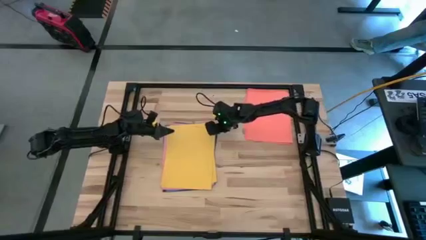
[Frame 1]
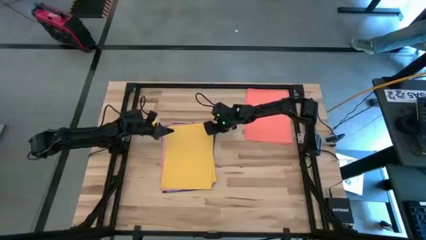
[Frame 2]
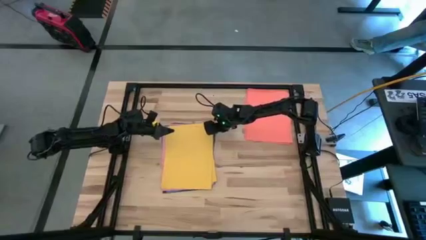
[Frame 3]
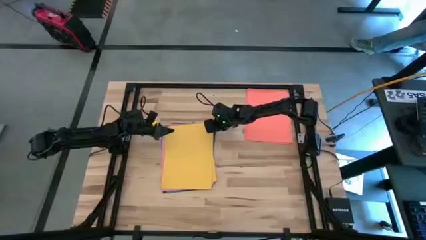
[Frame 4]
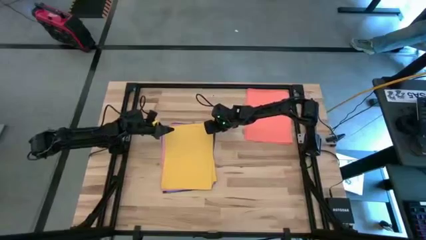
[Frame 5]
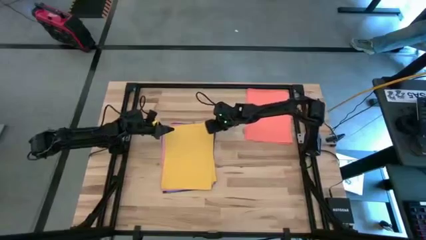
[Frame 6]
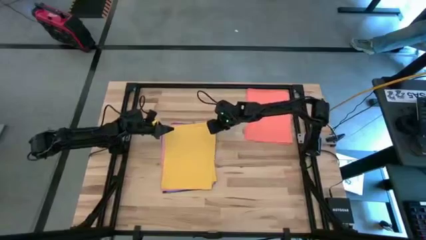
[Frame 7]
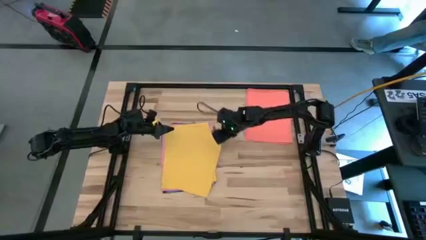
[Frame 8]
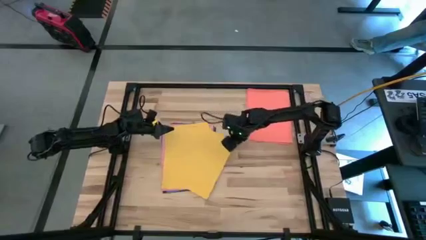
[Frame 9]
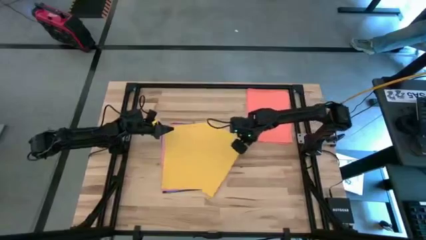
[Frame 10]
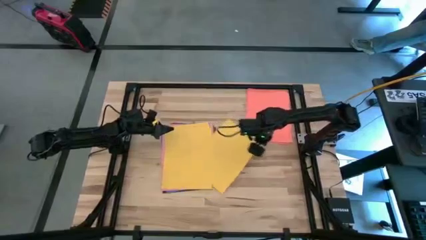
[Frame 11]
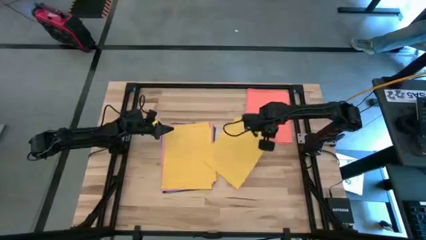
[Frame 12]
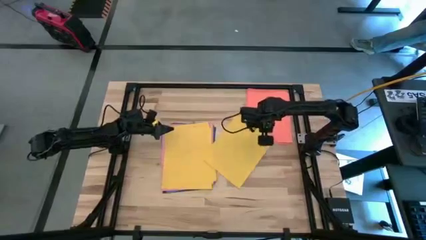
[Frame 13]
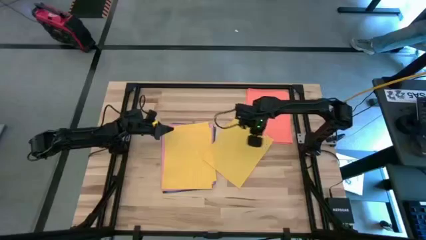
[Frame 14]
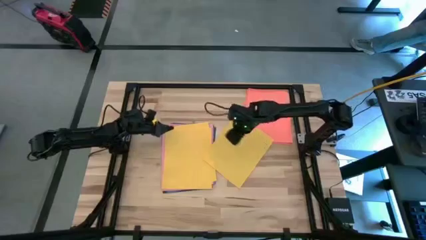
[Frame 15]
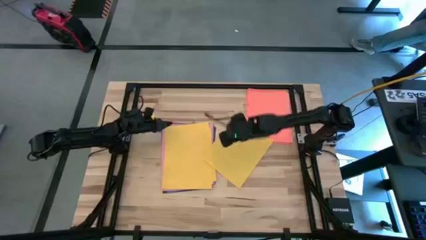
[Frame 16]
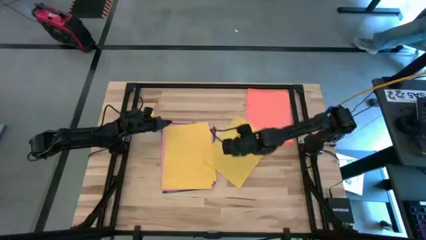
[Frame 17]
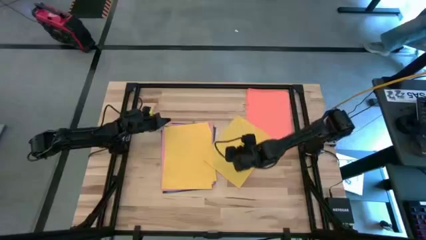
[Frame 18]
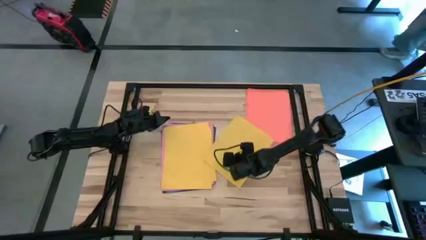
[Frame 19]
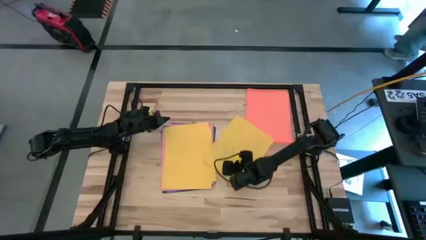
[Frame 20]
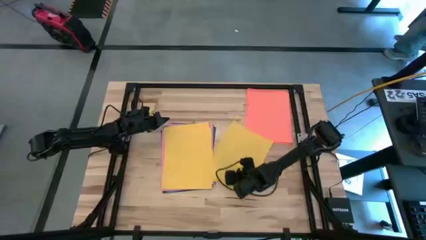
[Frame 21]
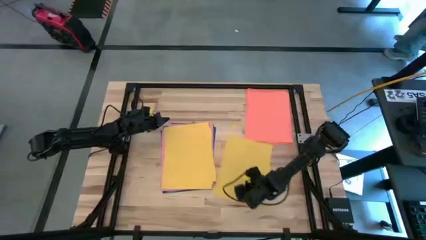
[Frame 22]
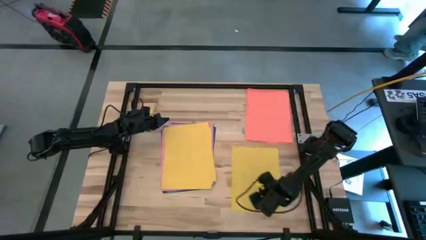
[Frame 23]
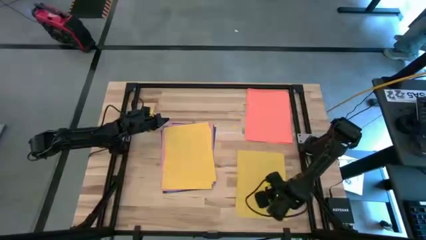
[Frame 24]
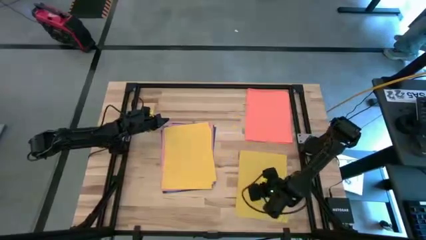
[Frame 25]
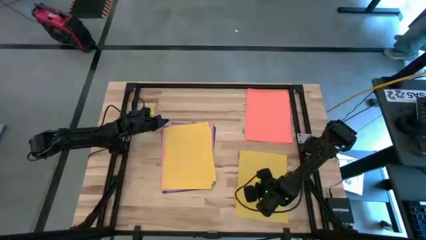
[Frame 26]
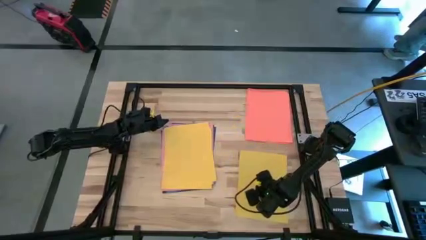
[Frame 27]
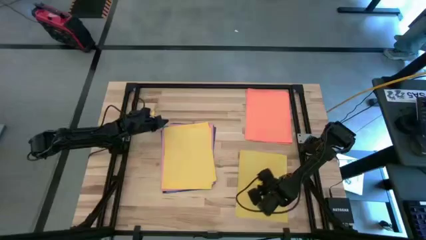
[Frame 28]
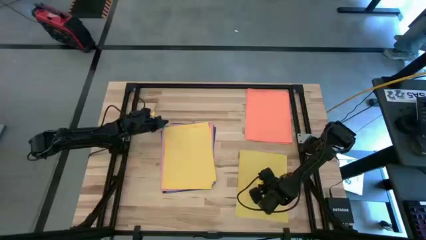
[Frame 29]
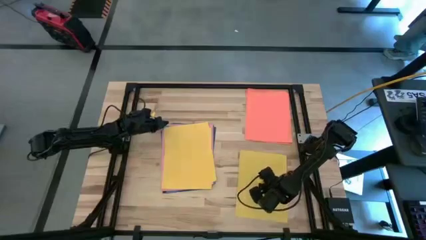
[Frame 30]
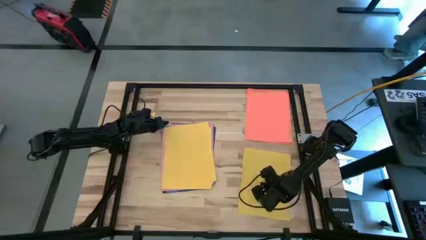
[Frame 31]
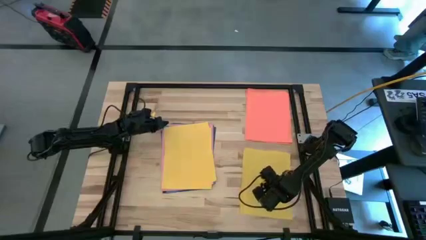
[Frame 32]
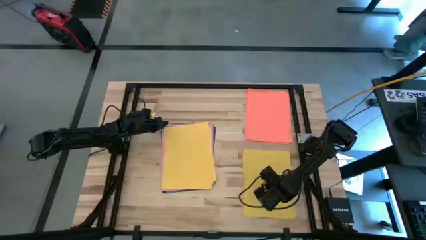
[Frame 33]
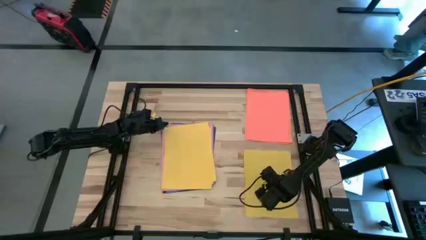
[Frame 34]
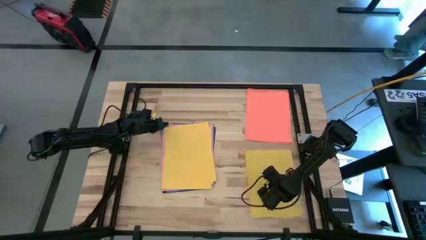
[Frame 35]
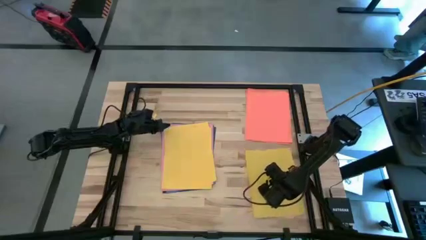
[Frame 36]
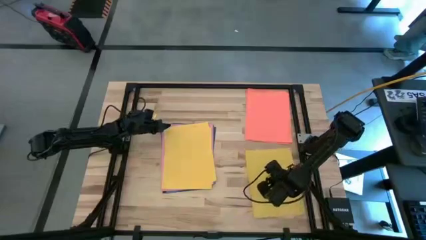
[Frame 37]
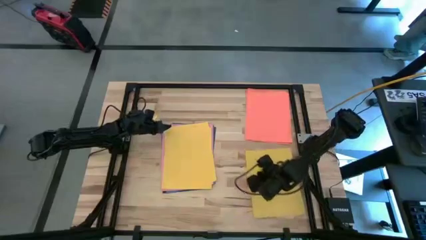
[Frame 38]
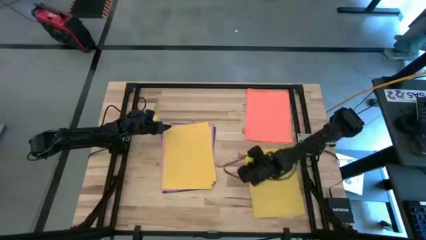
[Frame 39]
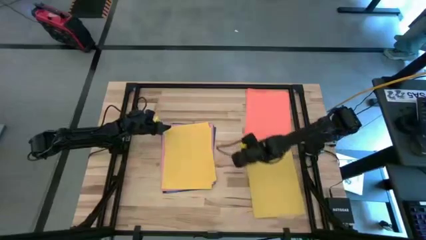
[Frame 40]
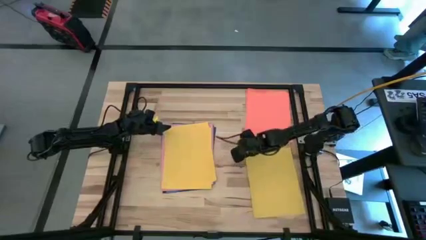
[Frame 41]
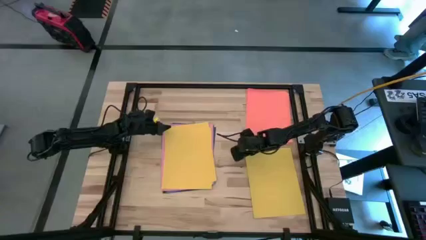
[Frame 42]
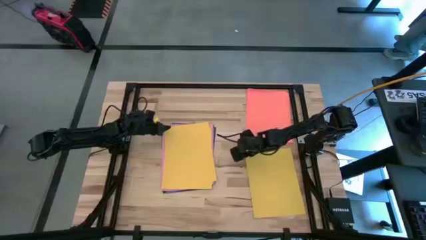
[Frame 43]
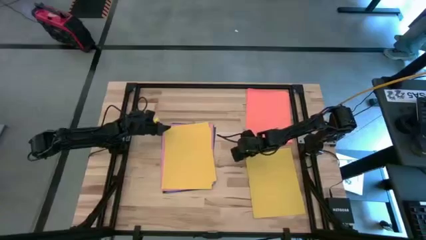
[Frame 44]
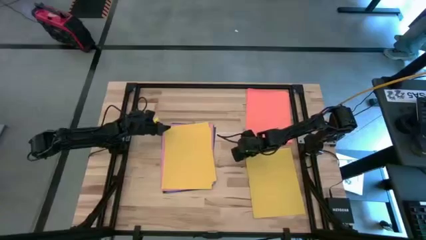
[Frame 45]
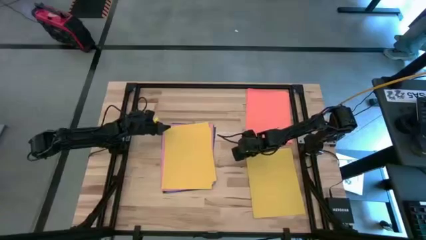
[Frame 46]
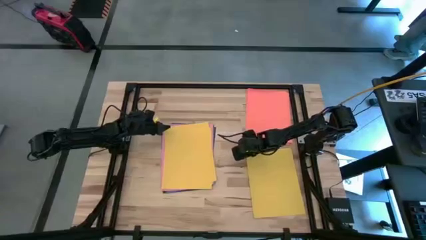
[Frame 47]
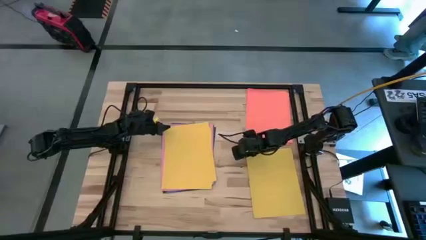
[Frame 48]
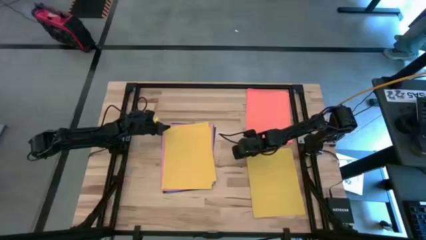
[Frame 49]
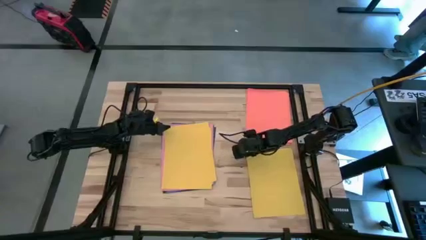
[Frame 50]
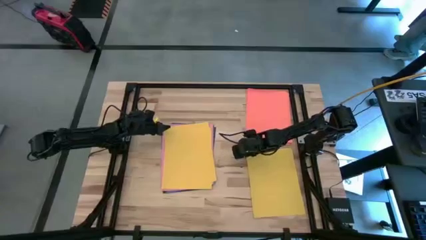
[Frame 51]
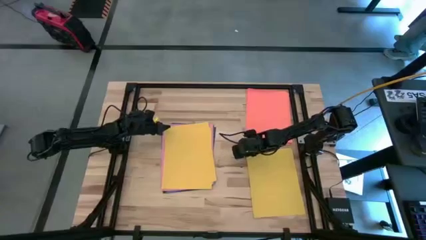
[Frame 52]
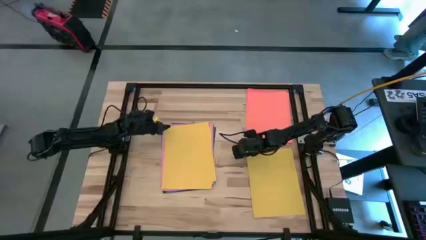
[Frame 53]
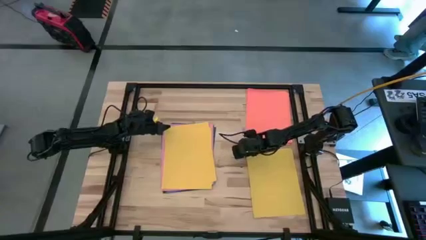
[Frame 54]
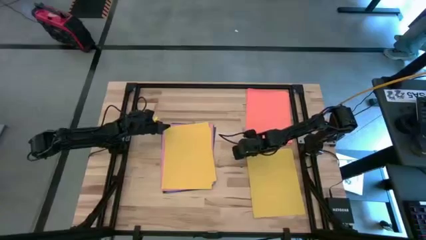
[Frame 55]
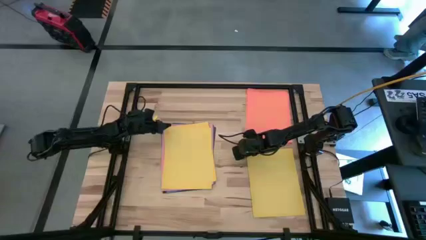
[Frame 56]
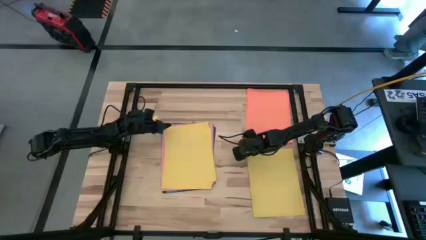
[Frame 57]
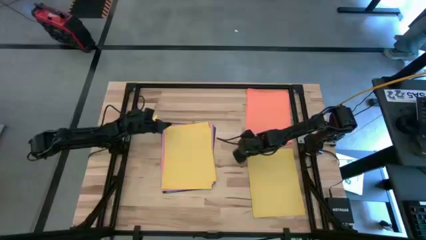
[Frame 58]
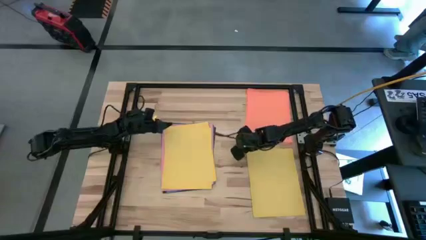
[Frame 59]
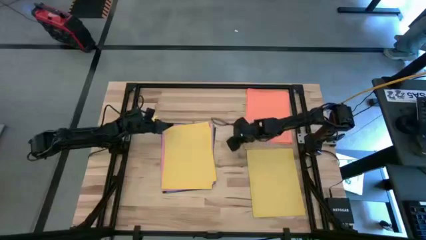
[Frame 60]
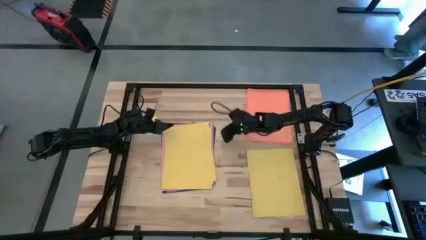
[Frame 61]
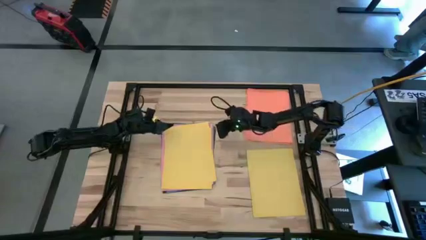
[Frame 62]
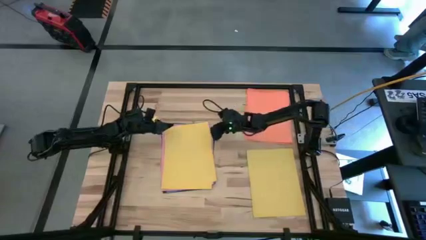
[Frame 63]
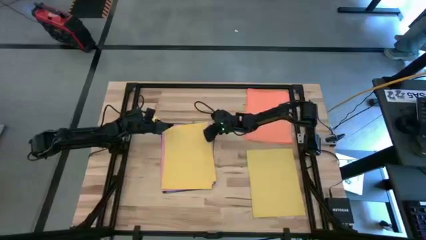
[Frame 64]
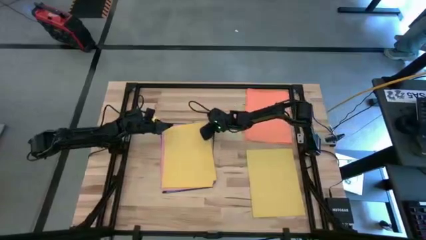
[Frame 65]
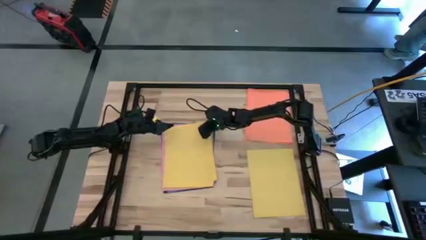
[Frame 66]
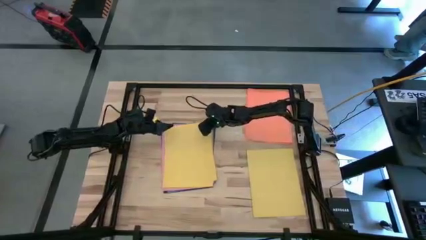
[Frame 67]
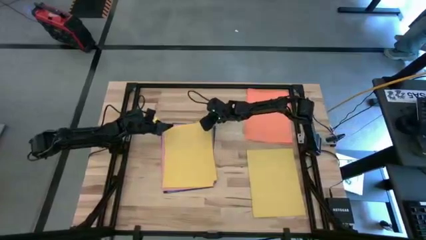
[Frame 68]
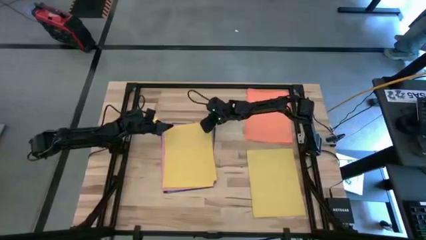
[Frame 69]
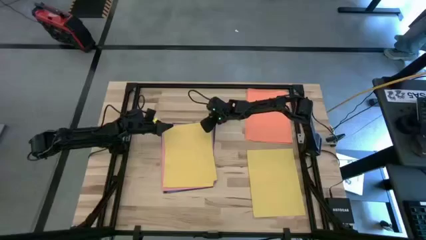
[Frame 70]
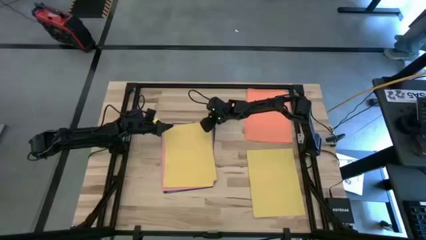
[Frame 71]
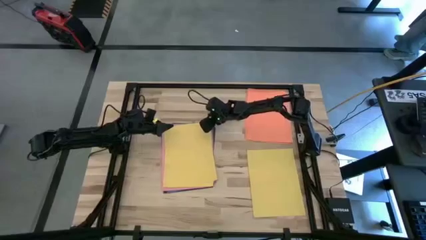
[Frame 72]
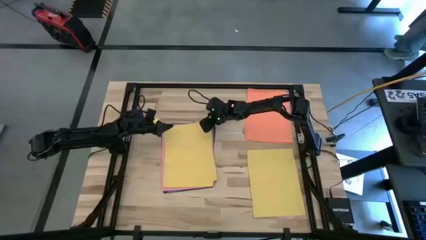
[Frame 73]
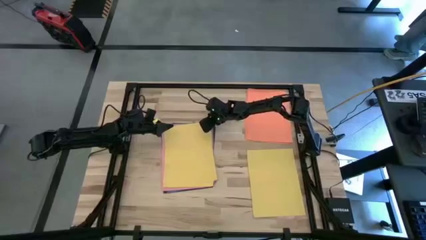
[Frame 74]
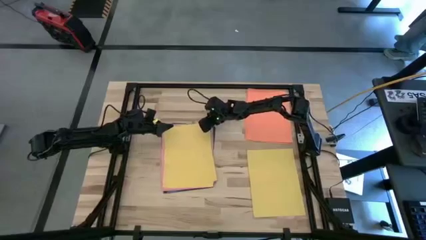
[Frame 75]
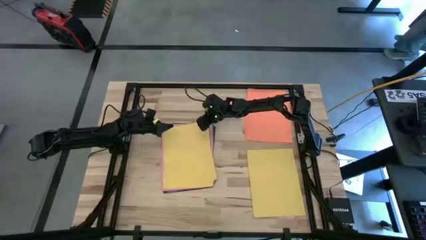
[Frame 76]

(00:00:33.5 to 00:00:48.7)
Task: Organize paper
Put all of the yellow paper at the bottom right of the table

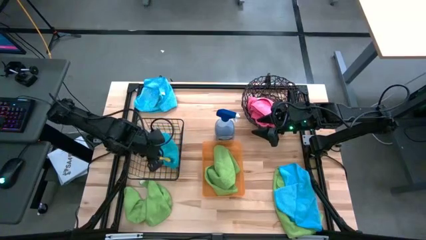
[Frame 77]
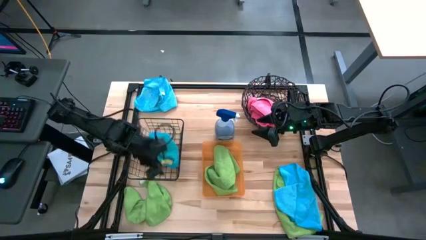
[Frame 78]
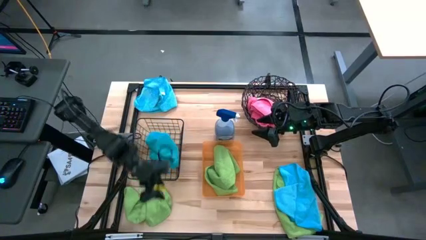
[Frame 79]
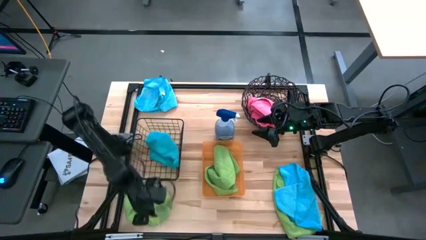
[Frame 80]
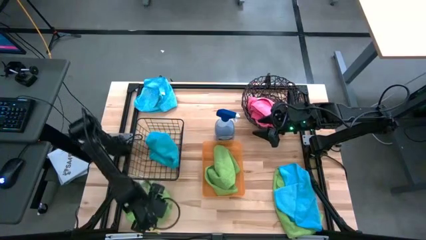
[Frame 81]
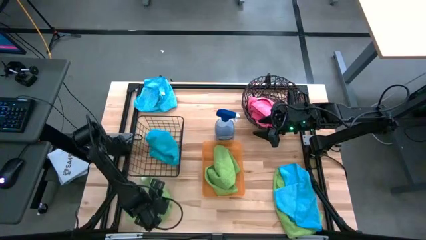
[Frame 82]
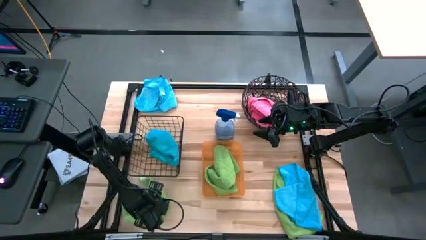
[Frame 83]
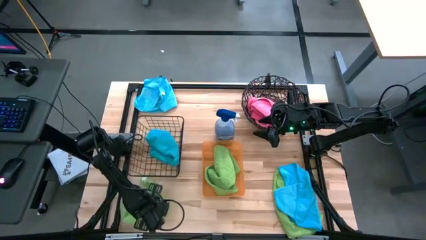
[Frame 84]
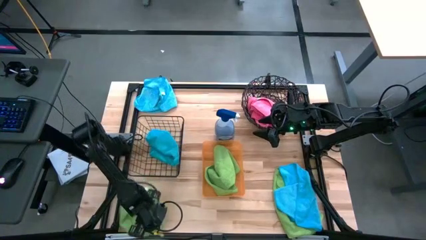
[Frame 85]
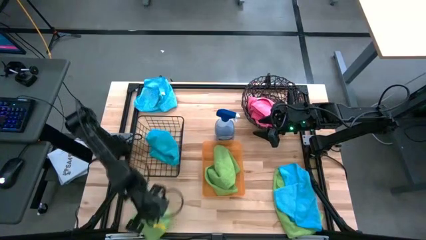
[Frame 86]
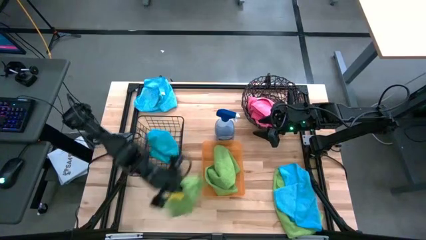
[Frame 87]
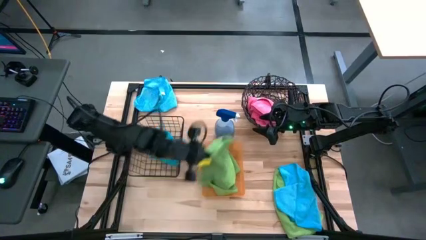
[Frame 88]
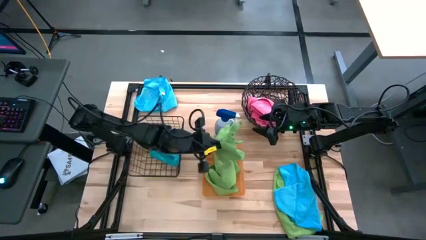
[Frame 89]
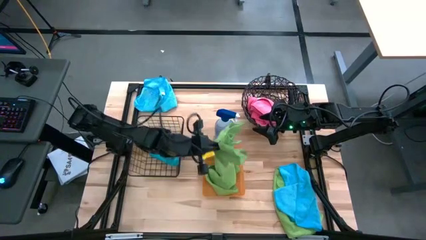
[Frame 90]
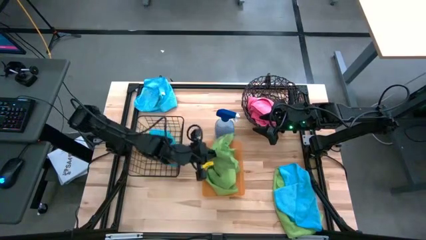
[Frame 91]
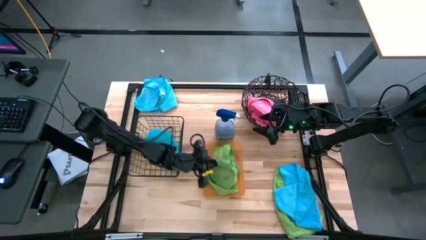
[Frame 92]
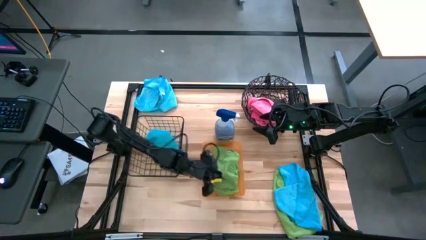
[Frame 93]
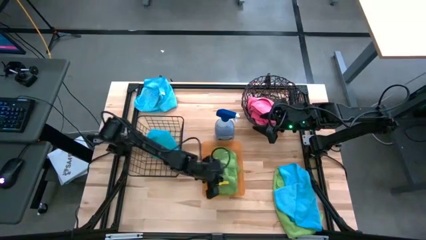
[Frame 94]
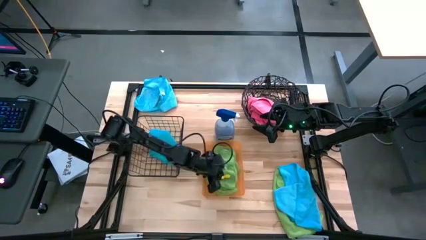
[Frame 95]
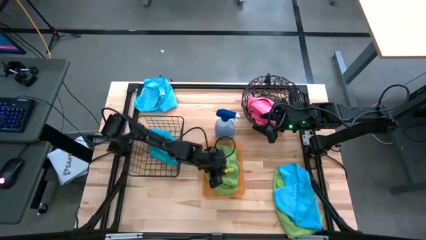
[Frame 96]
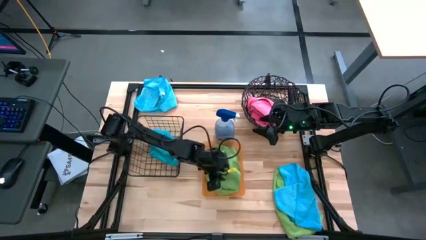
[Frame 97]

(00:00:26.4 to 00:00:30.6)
Task: Sort microfiber towel by color & place in baskets
Put the left green microfiber cloth into the transparent orange bin
